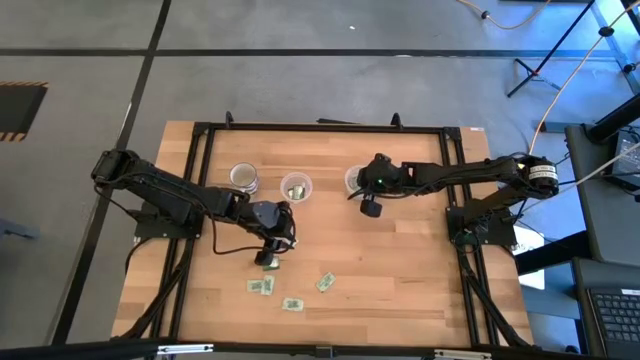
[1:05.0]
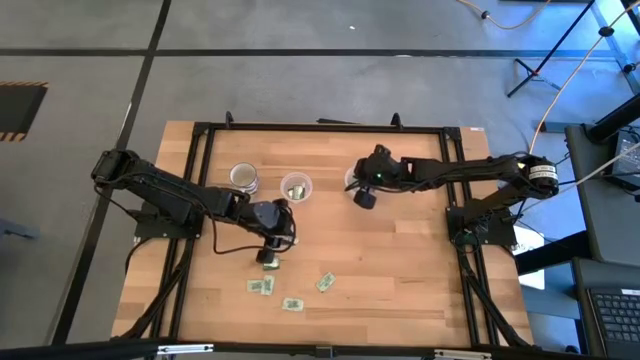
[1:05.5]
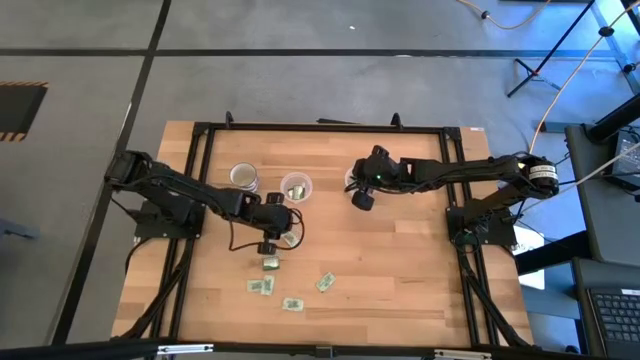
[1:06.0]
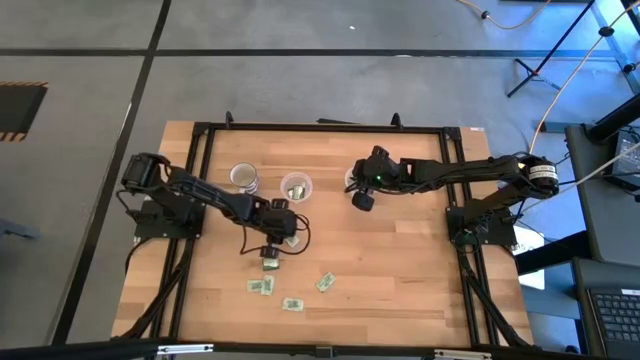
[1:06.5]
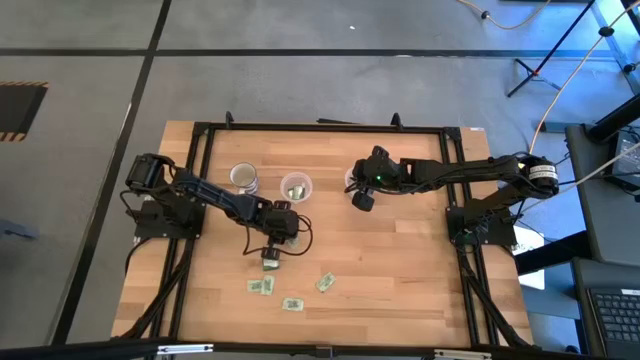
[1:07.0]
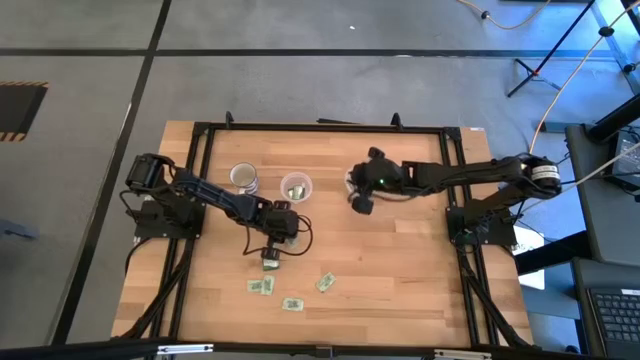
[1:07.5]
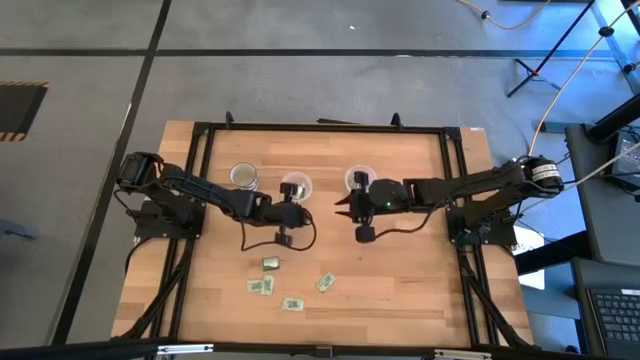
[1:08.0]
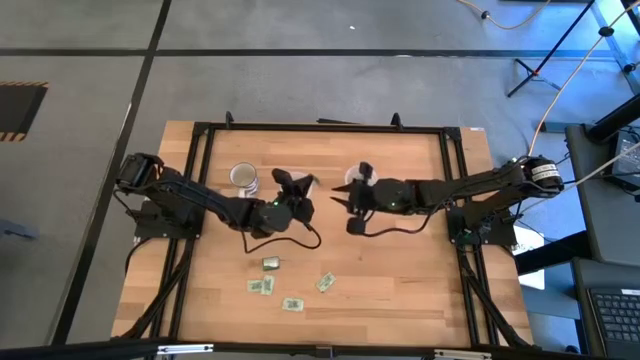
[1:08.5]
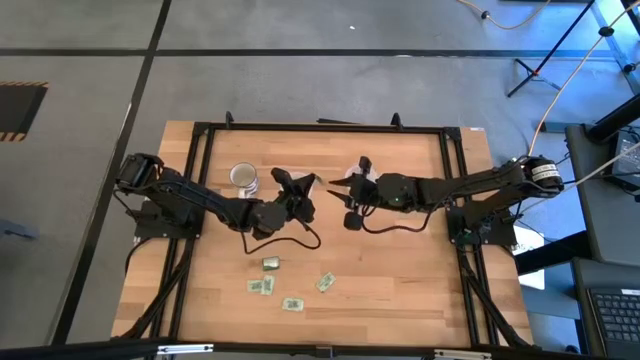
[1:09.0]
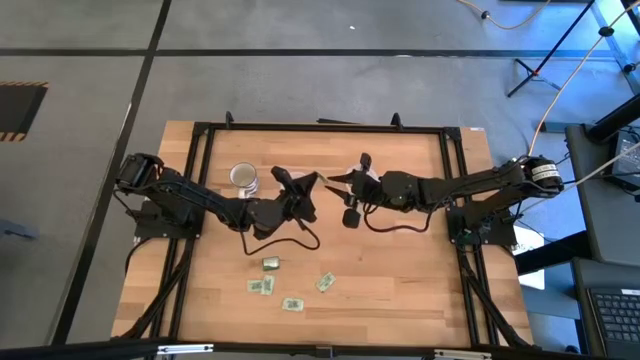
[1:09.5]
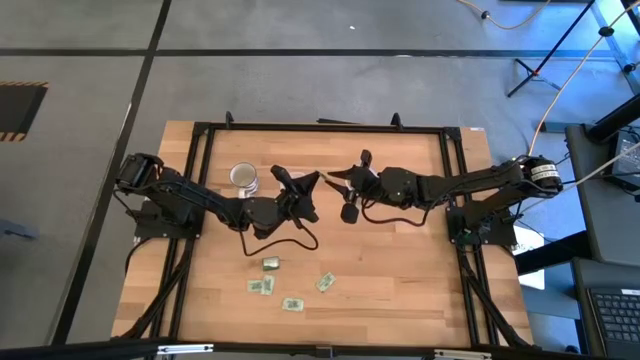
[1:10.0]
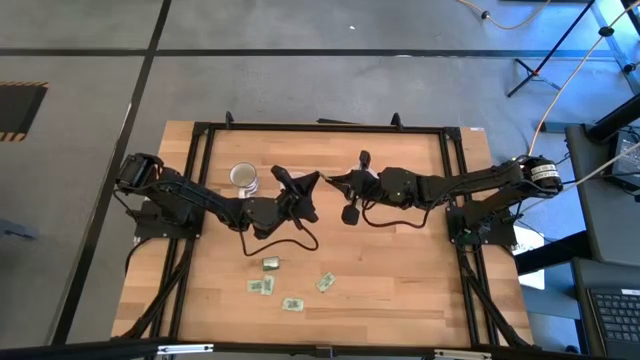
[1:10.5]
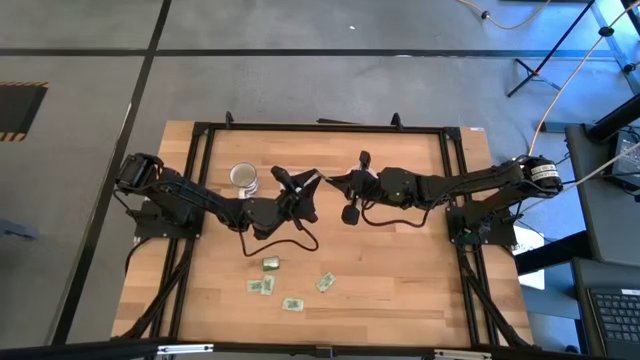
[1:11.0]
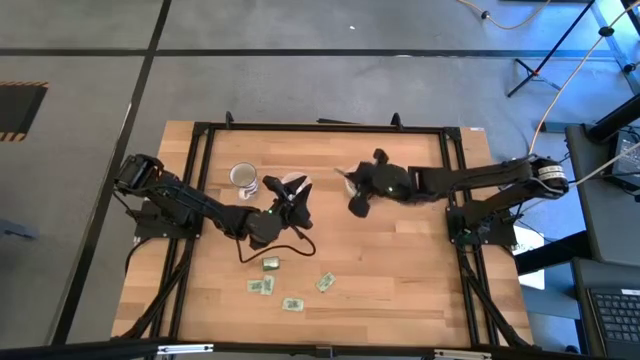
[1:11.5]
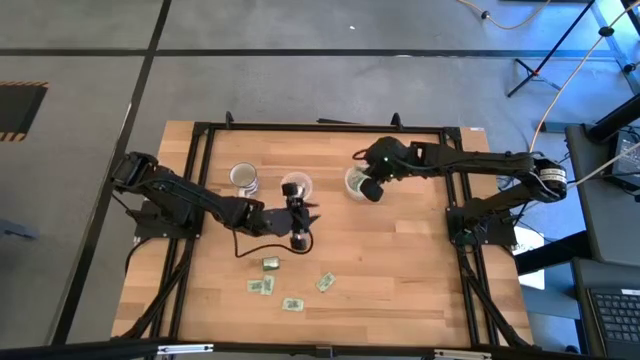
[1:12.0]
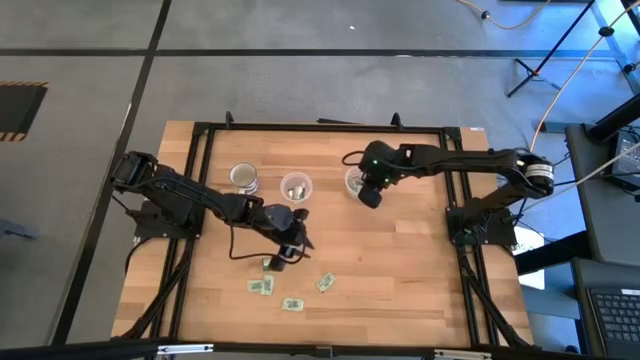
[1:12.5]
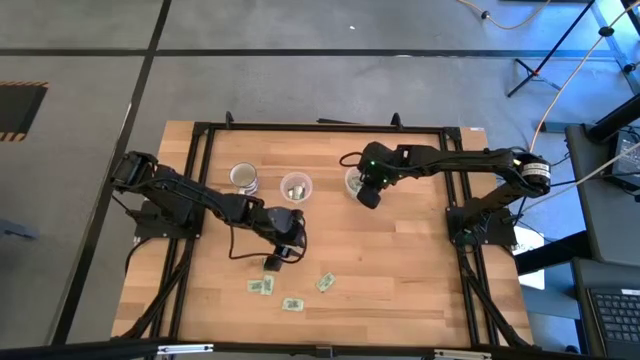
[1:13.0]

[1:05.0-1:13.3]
Task: Pick and place items into bin
Put the white stevia packet into the right transparent bin

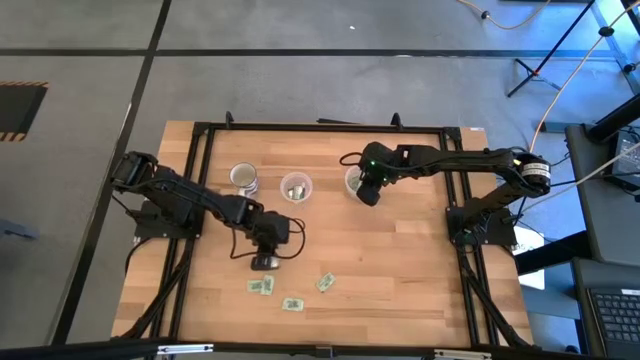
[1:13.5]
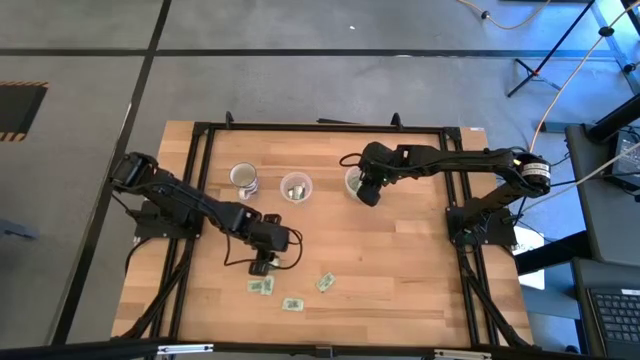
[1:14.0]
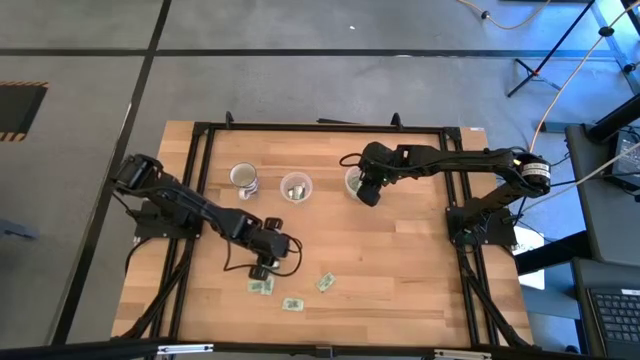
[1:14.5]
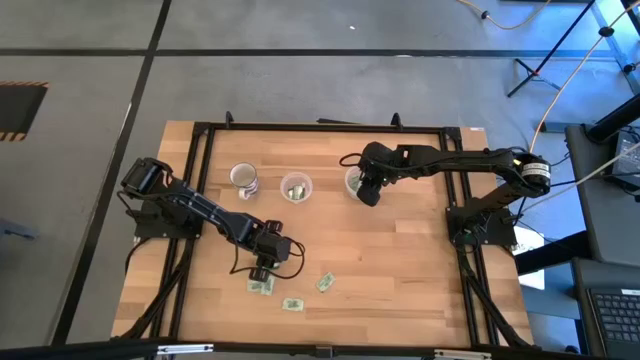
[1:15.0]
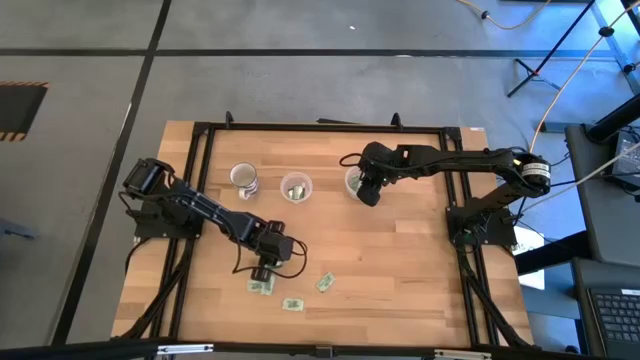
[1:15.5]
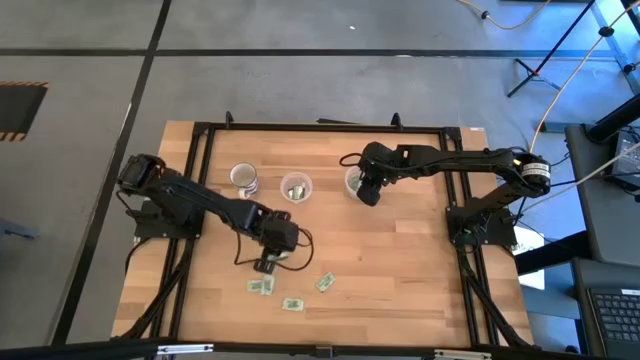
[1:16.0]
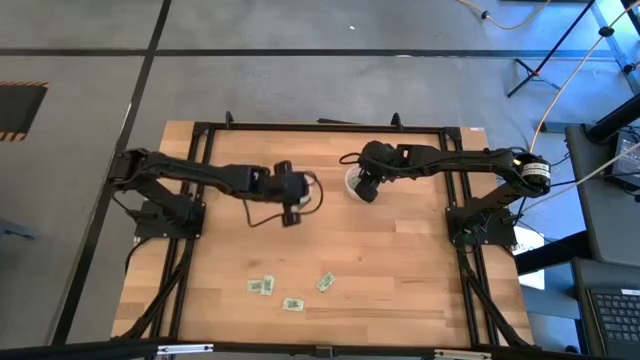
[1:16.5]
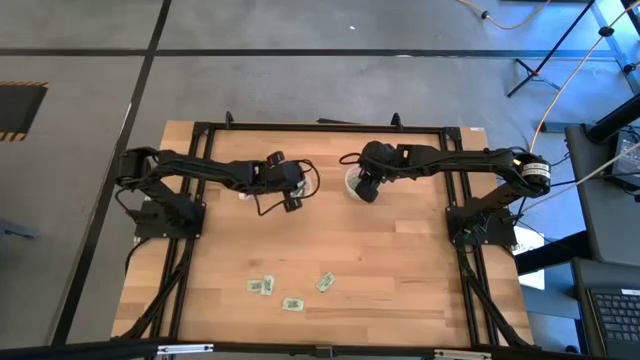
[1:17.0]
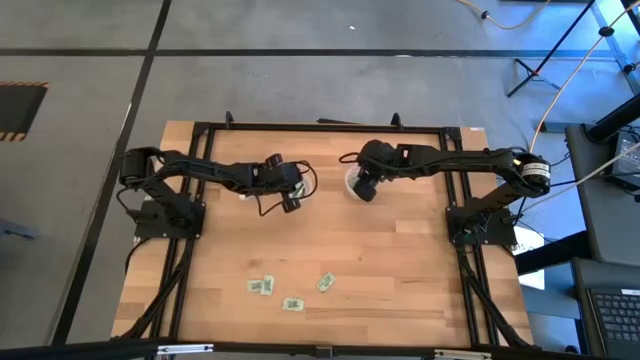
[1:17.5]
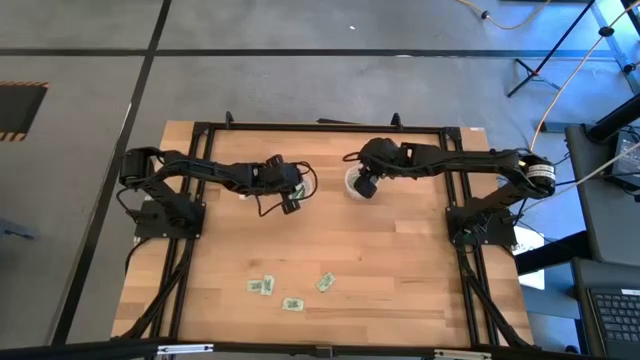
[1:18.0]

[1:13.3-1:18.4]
Put the green truvia packet into the left transparent bin

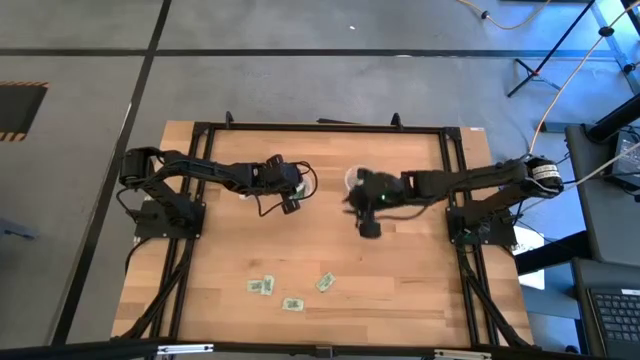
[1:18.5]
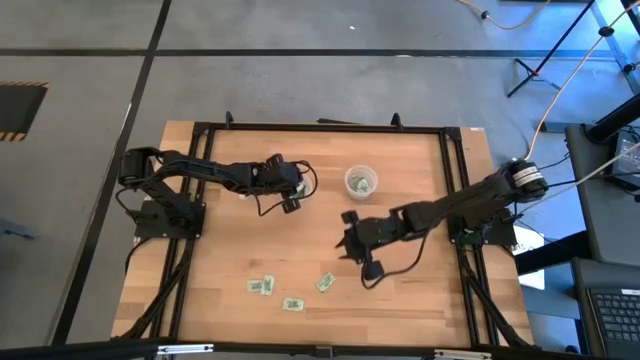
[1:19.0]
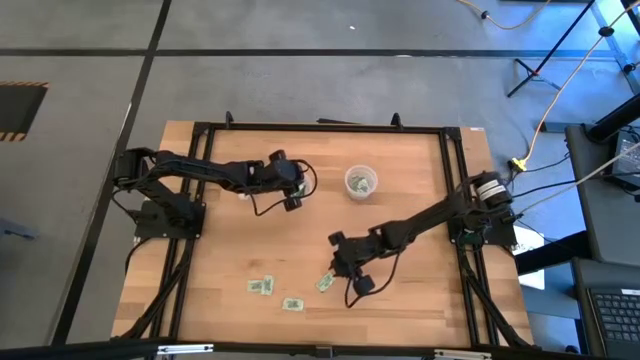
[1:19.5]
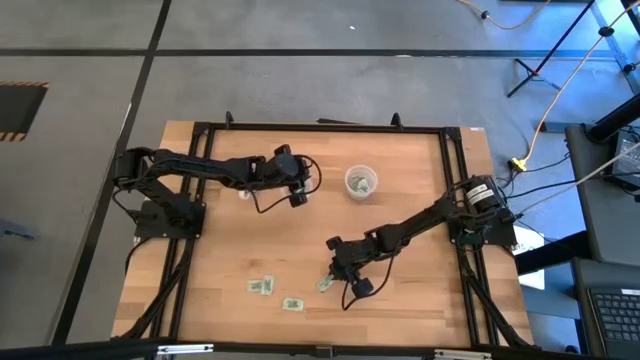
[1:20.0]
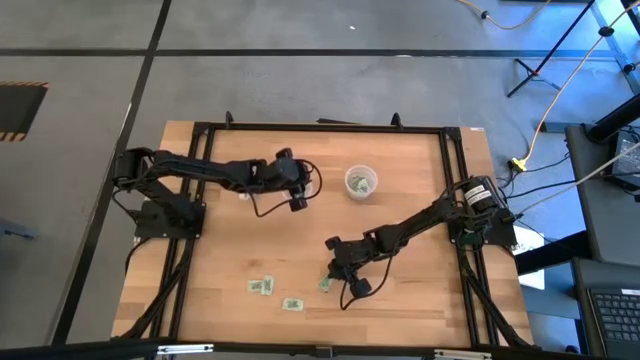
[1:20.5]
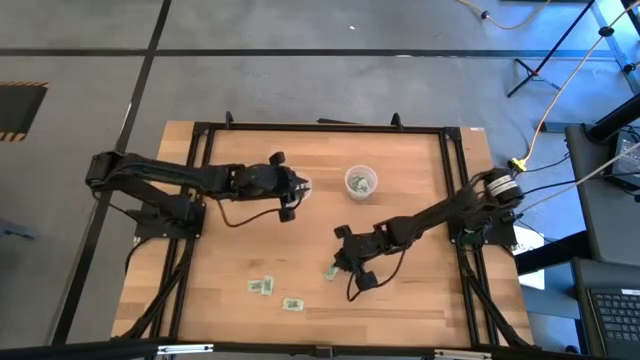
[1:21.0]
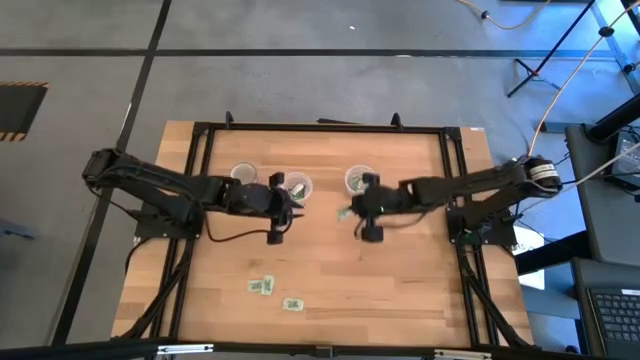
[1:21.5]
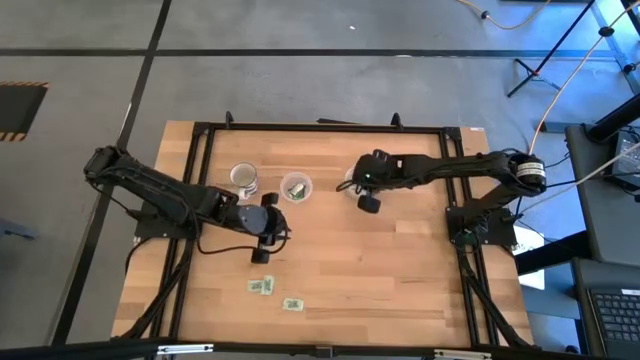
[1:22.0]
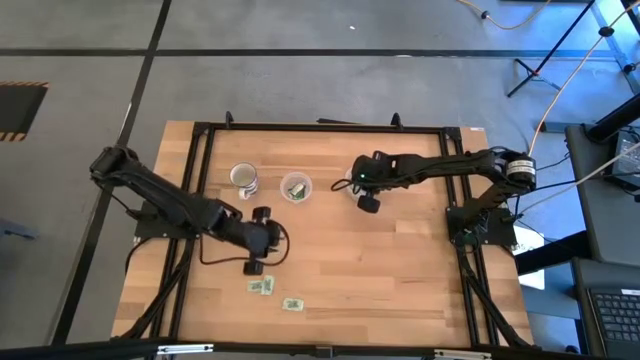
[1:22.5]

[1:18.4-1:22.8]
Put the white stevia packet into the right transparent bin

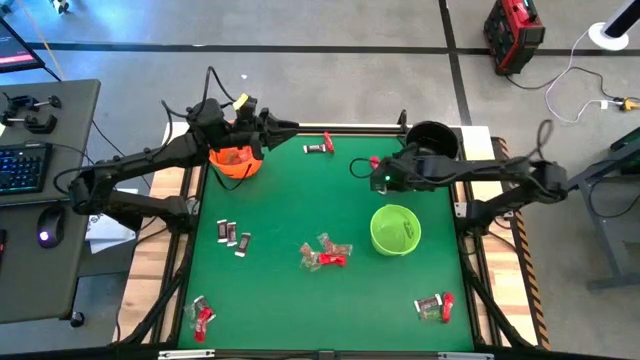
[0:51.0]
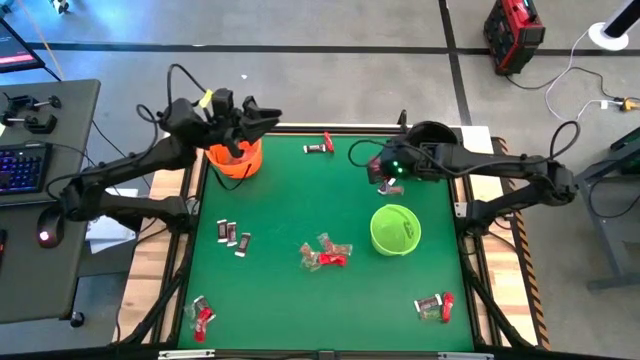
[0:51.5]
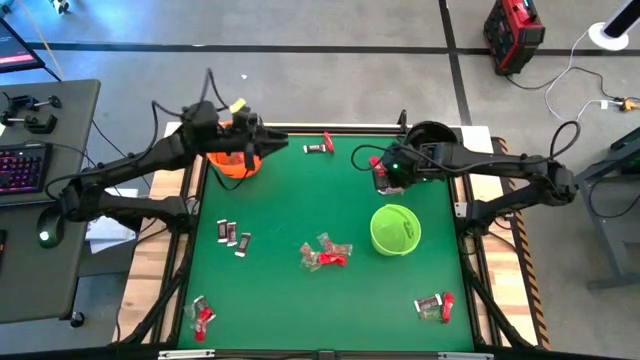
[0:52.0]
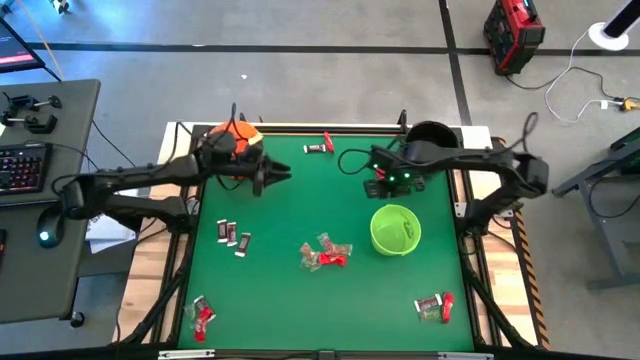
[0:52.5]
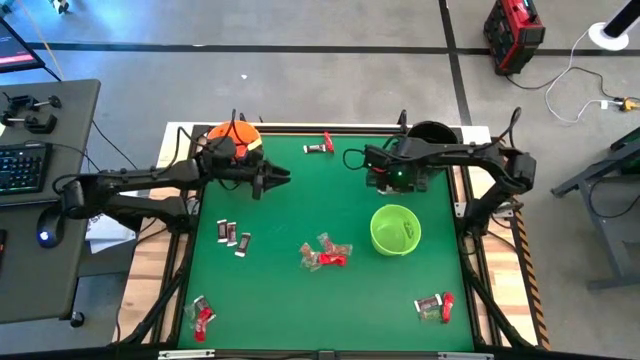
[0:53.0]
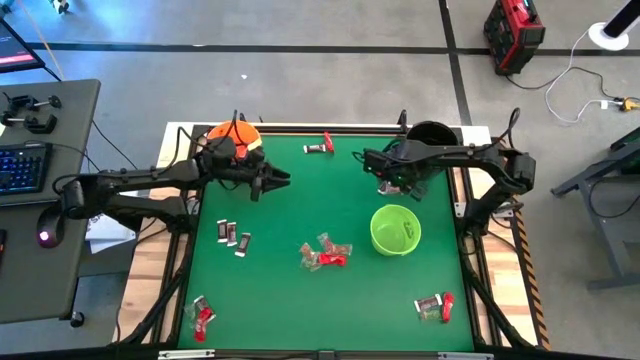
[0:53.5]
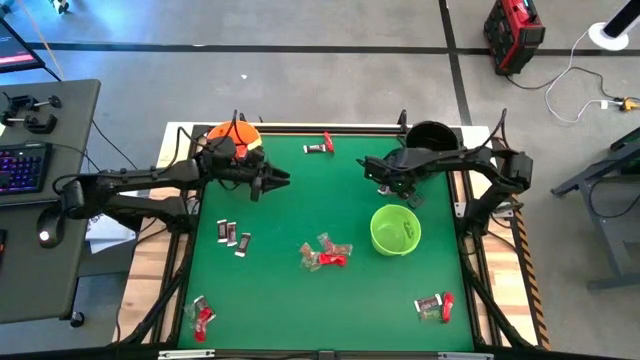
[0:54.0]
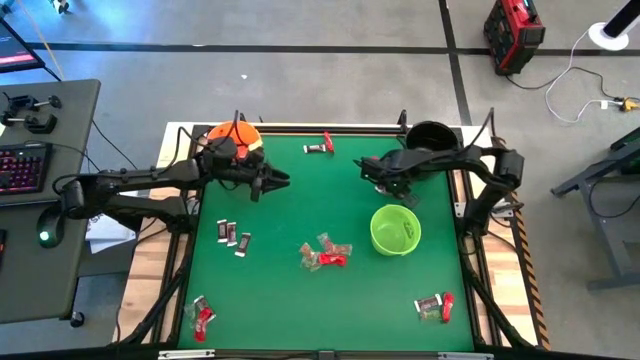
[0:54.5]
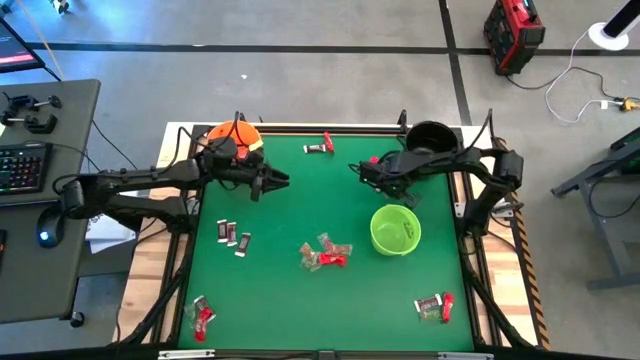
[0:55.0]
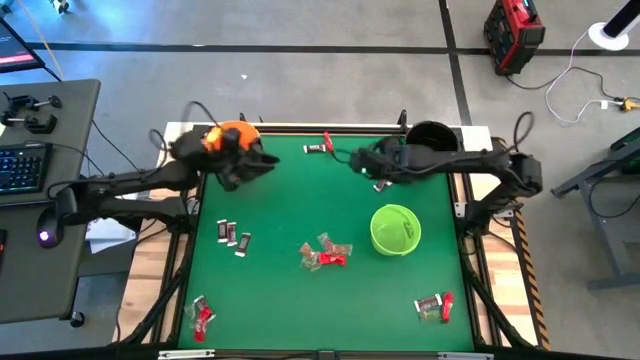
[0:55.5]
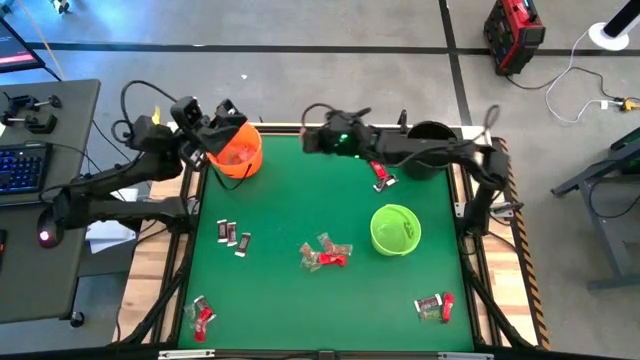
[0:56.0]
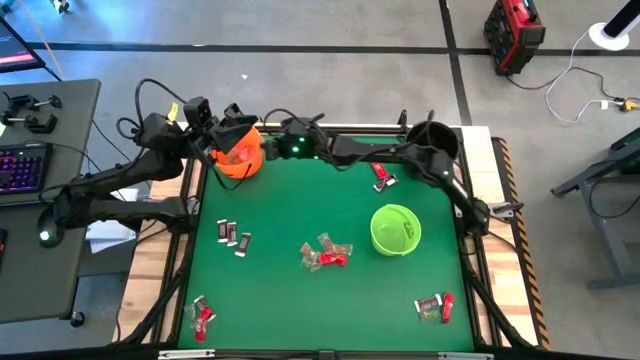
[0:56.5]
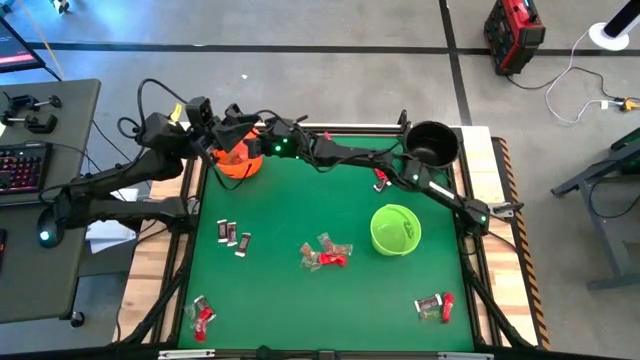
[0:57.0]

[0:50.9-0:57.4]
Task: Sort candy by brand, put in halloween buckets
Put the orange gummy into the orange bucket
